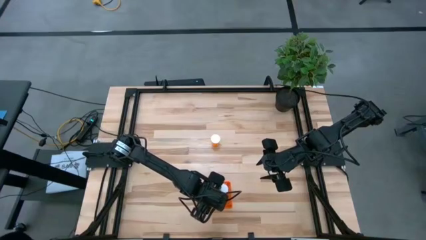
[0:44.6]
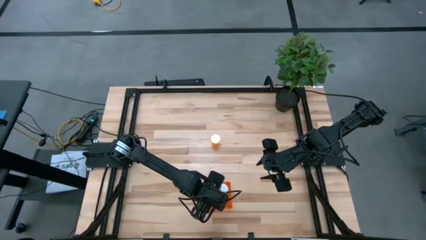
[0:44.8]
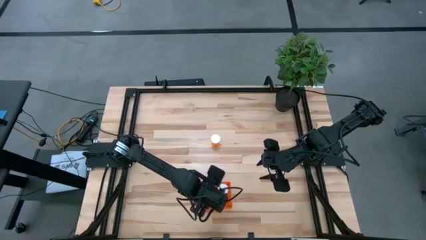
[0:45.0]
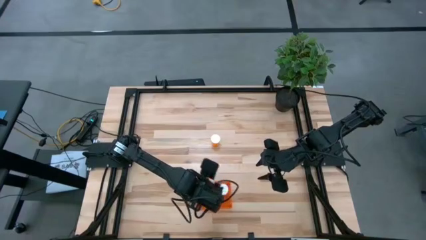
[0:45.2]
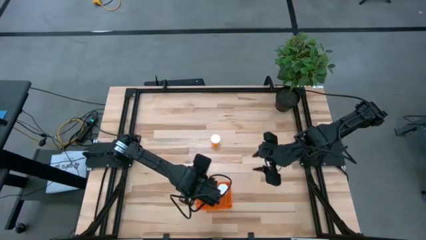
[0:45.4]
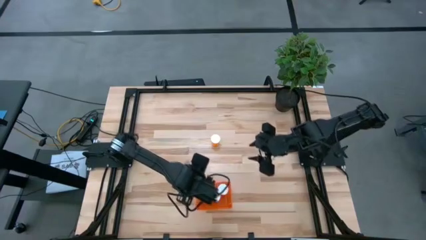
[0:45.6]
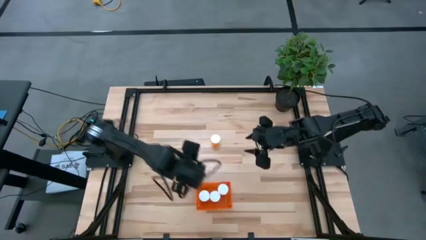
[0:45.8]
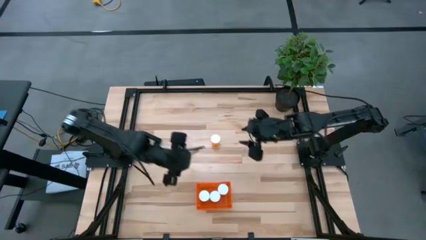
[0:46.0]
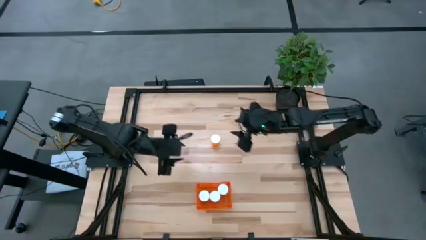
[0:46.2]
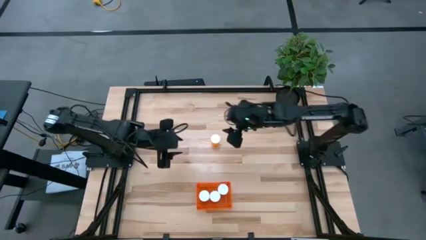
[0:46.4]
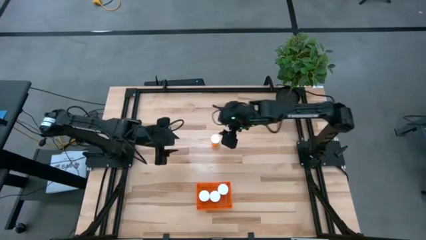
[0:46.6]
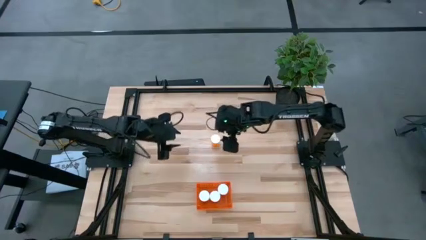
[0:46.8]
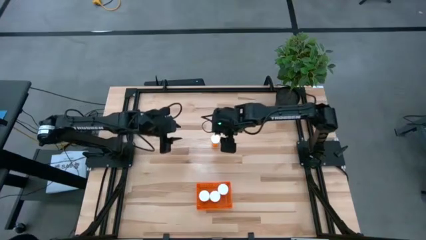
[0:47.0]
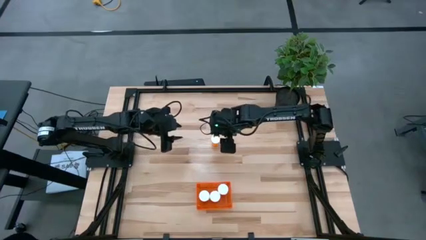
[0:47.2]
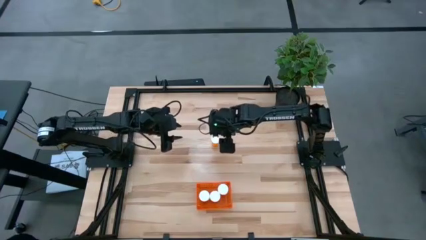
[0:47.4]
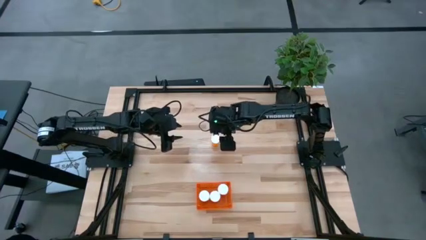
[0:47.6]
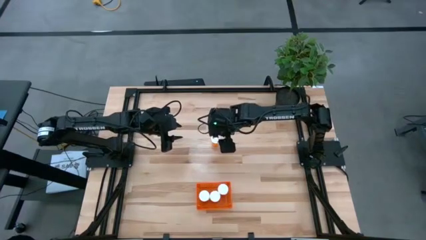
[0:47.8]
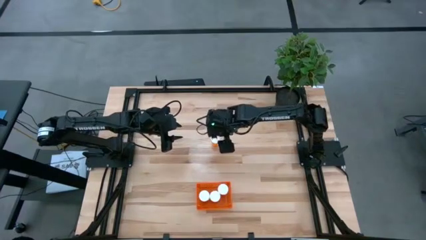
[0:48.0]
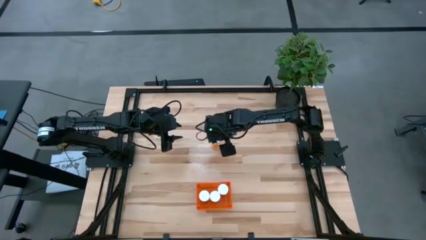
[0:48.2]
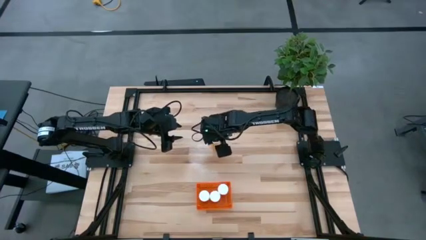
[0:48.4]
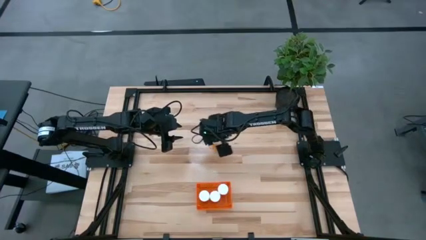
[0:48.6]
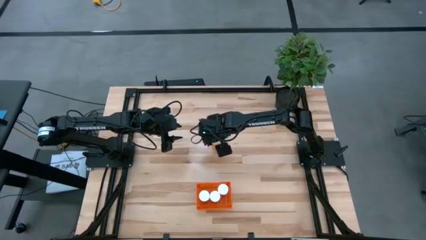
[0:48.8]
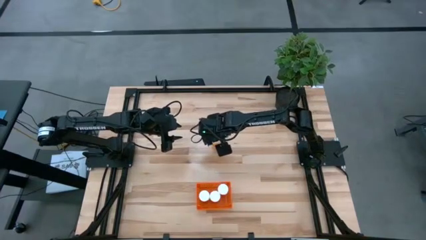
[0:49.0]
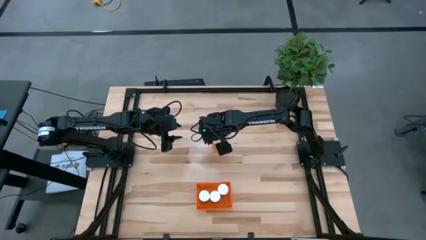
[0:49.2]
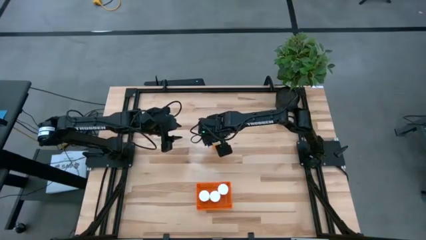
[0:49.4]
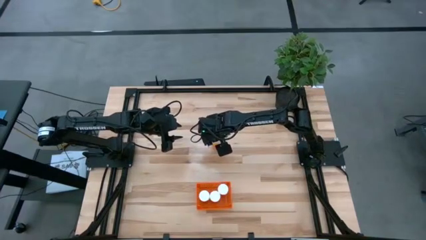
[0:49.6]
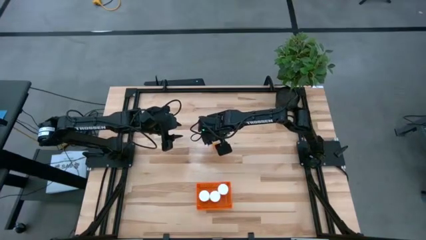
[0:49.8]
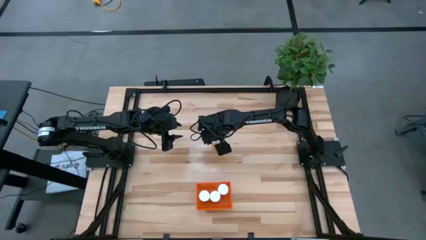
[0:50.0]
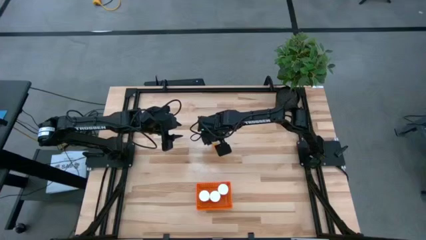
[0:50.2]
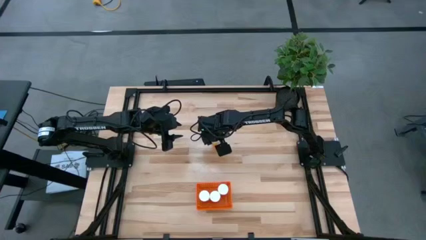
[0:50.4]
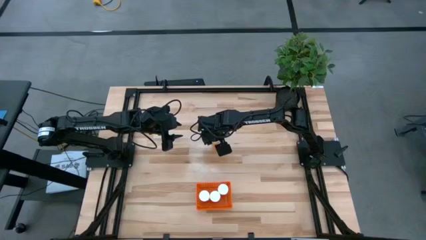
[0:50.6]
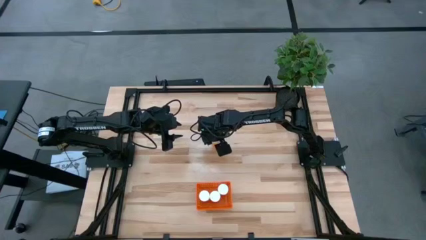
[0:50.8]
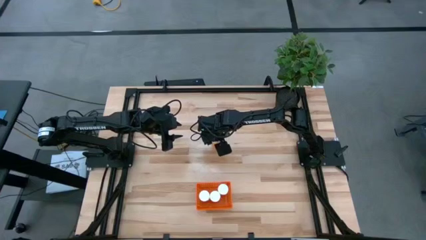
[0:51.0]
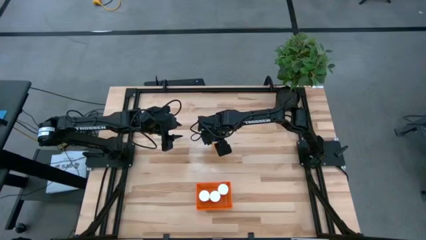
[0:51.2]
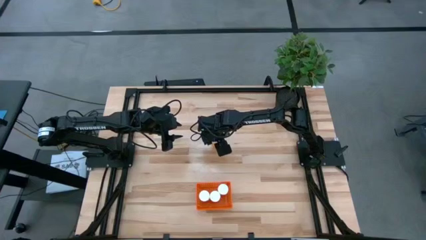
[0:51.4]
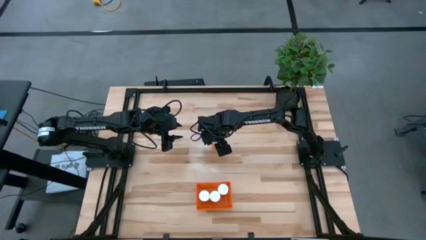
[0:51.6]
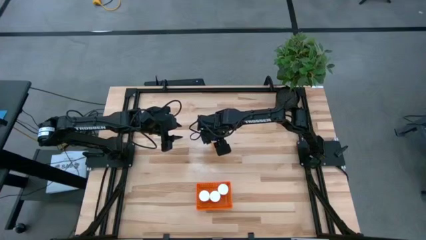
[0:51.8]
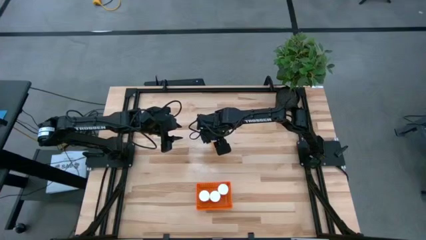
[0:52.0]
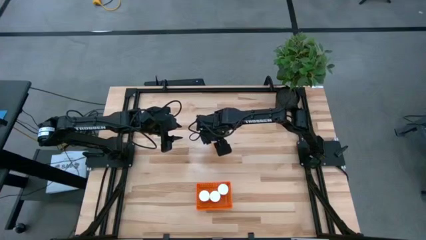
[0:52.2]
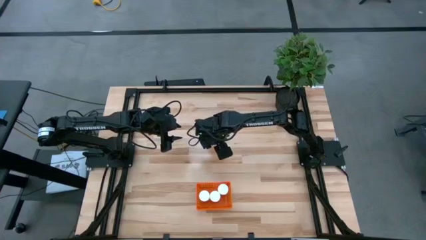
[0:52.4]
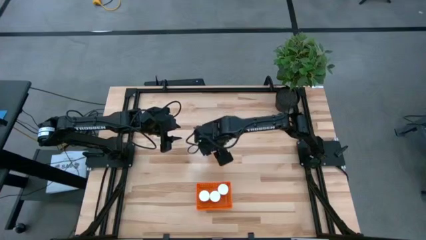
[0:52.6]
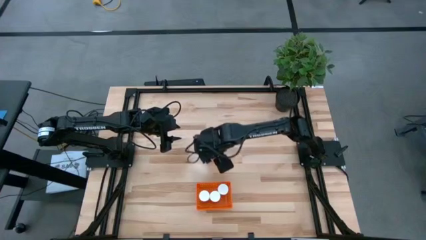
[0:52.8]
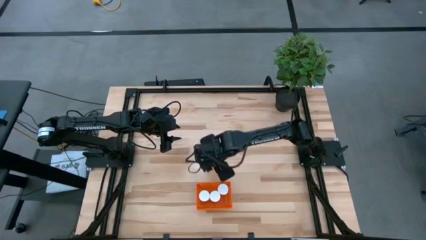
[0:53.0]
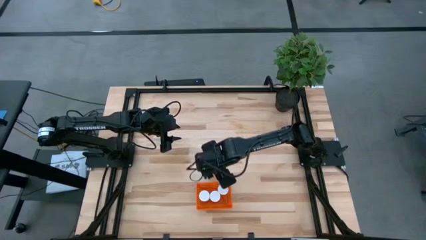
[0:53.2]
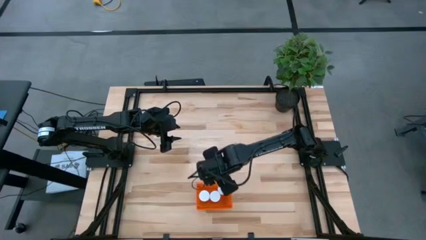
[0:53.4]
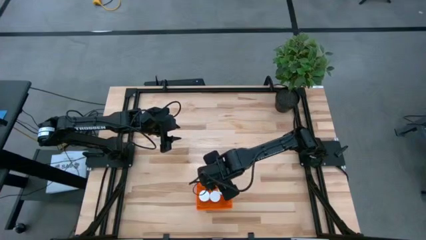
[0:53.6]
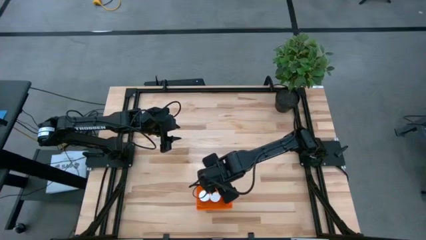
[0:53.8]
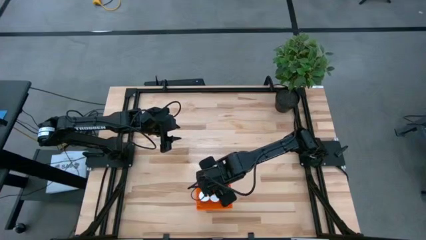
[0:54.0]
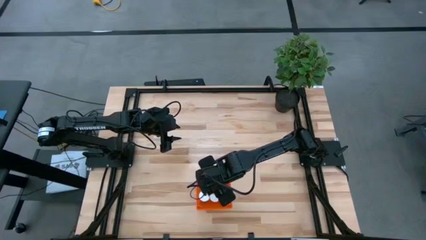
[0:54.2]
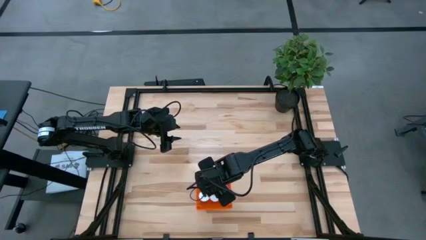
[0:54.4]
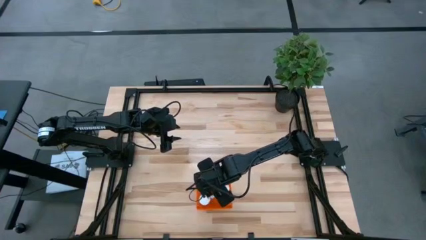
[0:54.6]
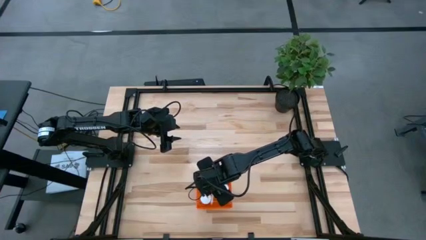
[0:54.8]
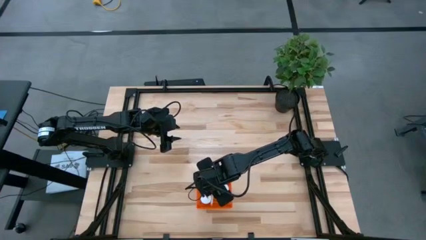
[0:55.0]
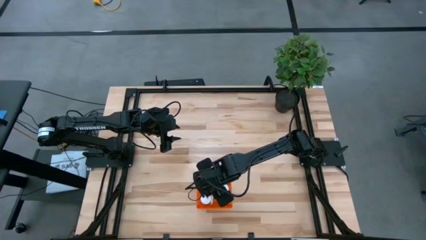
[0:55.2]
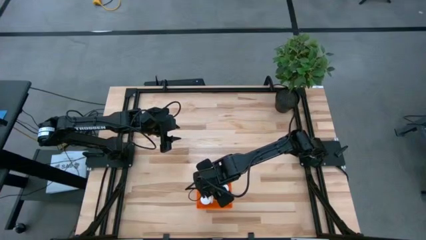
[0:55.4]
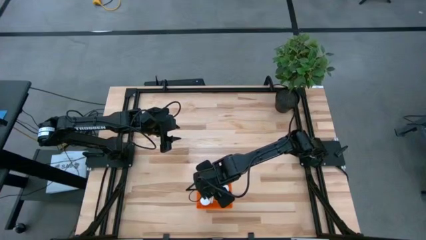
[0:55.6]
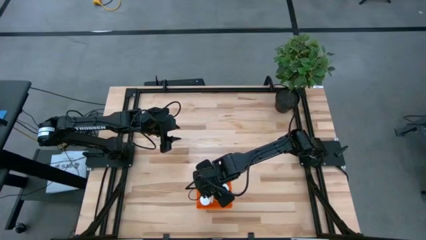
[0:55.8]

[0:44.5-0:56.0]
Task: Pick and place pill bottles into a basket
Put the orange pill bottle into the orange bin

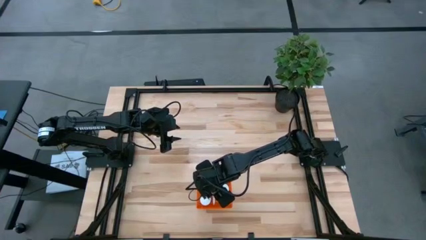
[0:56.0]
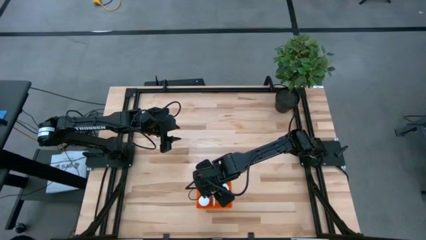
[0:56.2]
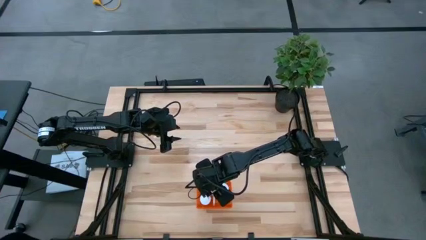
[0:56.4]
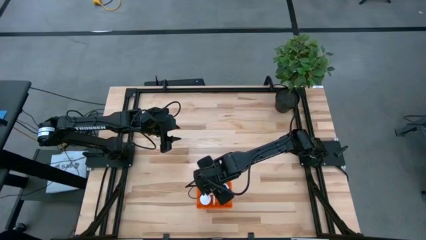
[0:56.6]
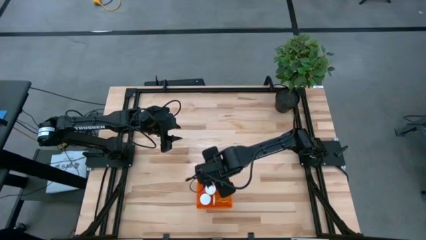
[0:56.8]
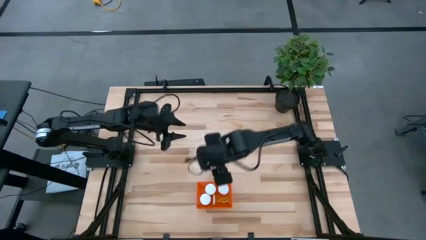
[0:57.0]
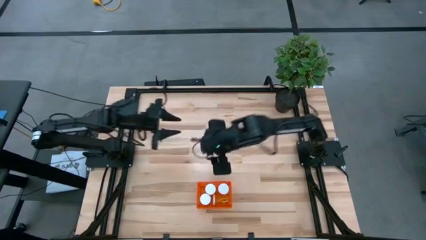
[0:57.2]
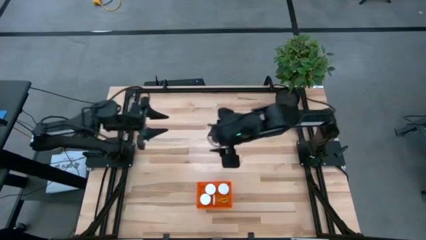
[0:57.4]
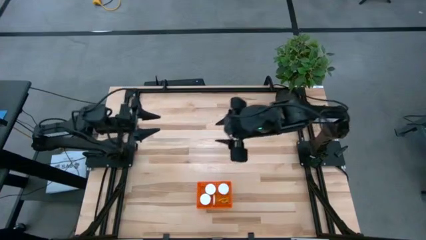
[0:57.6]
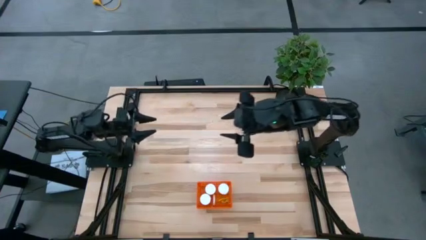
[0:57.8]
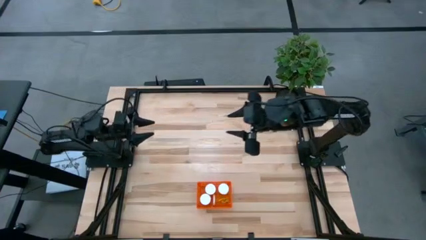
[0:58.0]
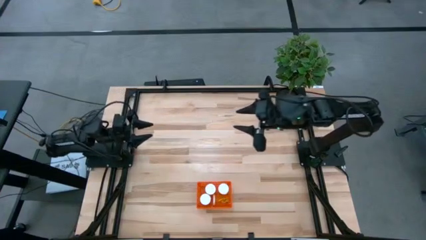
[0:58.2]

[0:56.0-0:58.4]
Return to Home Position

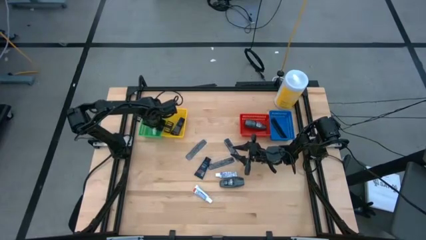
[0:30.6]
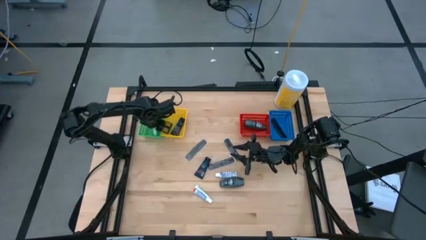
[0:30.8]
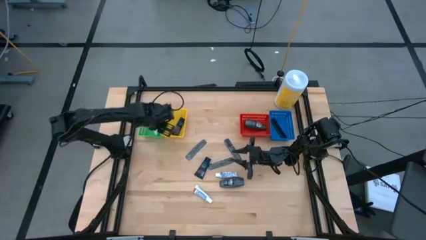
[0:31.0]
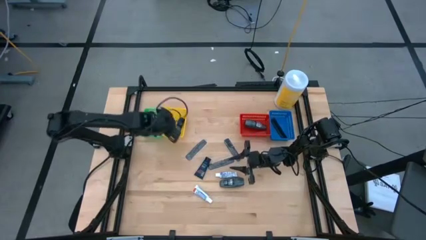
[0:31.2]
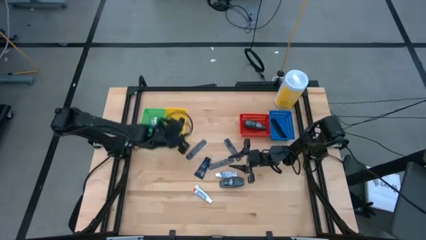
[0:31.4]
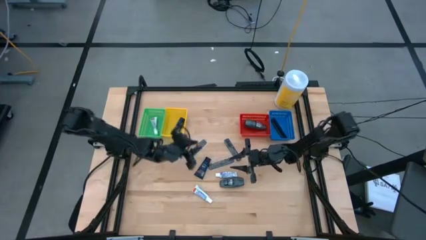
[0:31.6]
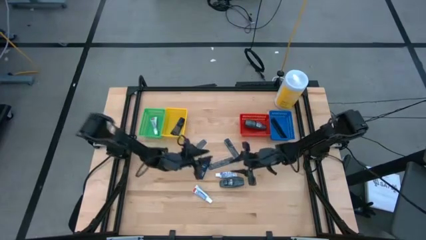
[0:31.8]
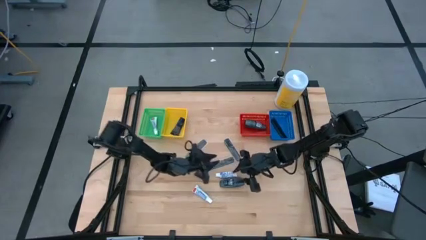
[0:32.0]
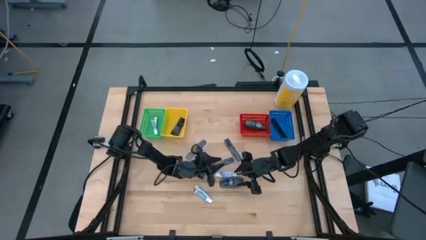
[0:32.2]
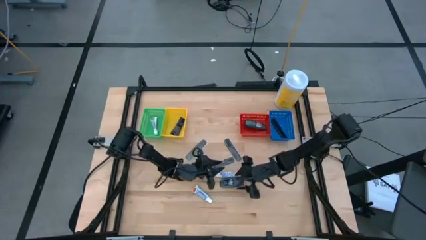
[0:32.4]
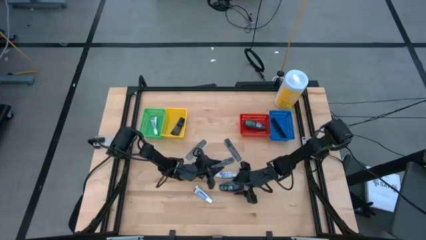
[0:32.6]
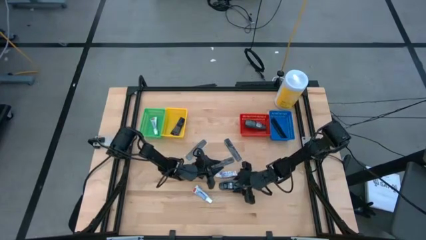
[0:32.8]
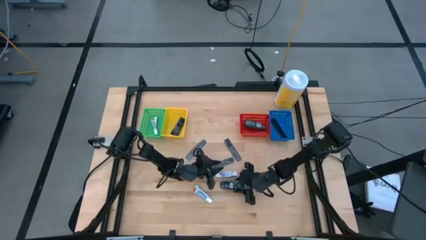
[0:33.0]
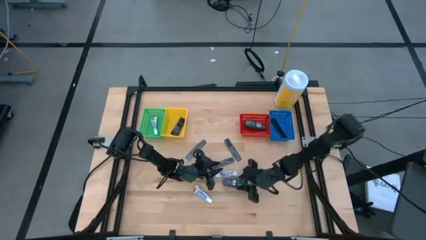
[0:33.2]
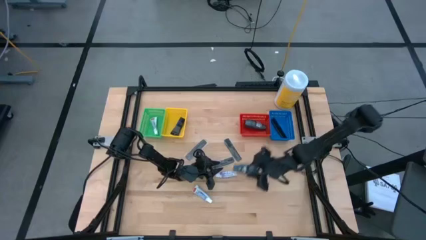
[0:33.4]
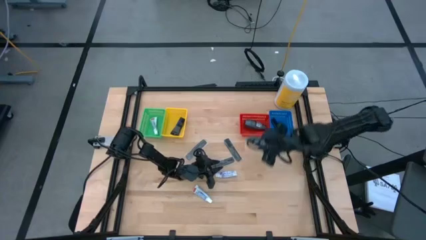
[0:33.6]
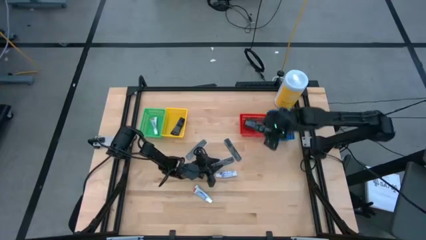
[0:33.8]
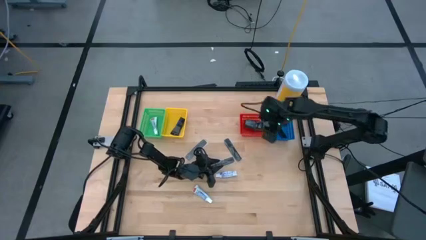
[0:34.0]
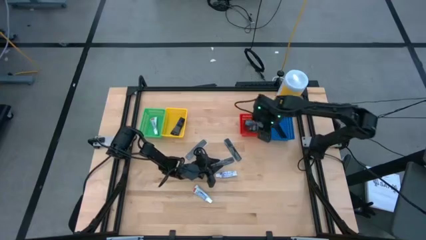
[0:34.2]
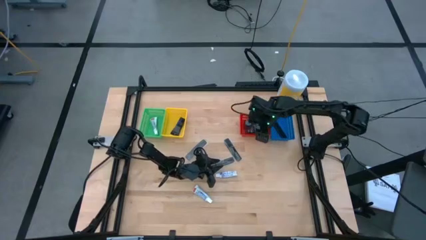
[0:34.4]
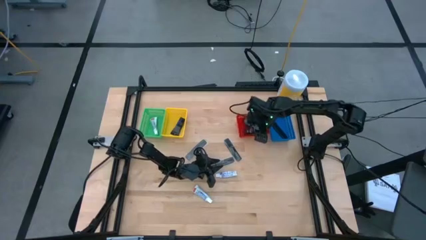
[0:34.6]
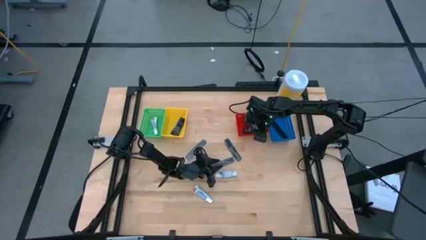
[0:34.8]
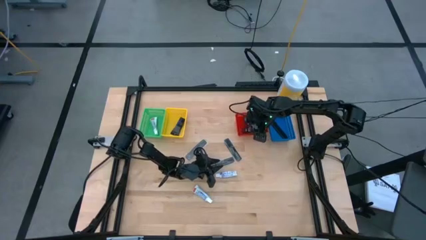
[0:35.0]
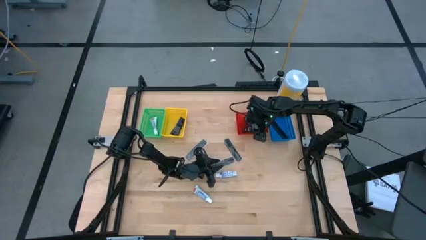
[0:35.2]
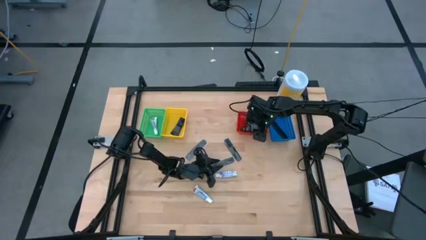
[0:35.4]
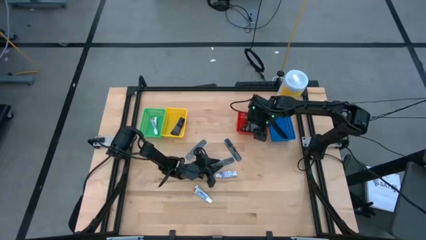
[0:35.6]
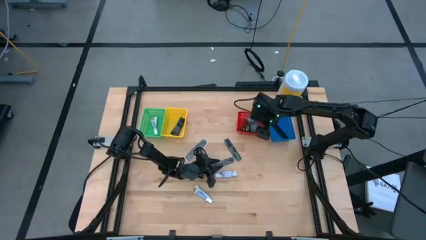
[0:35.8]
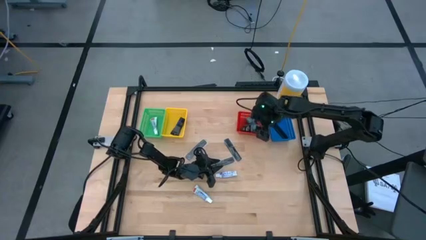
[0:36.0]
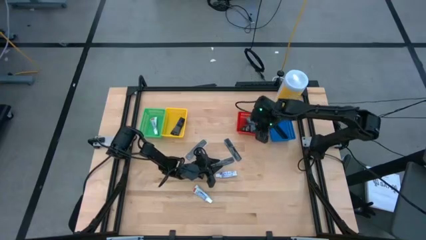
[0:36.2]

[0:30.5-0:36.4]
Task: Pick & Place Travel size toiletries
Put the deodorant into the red bin
